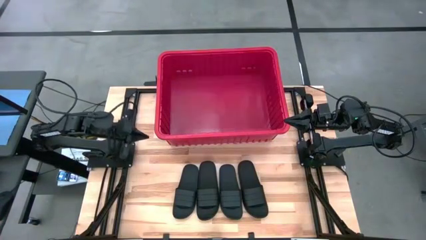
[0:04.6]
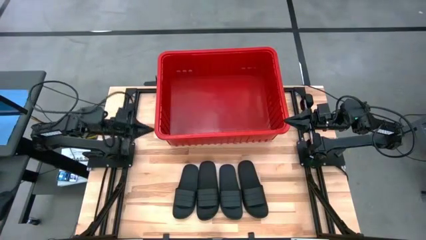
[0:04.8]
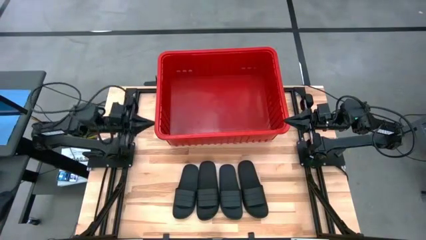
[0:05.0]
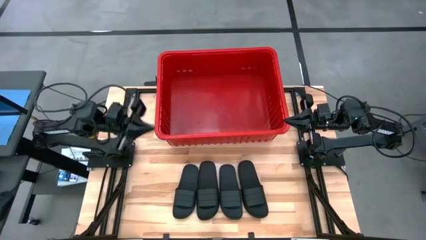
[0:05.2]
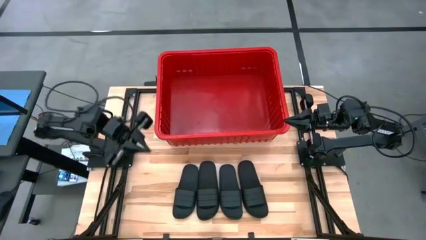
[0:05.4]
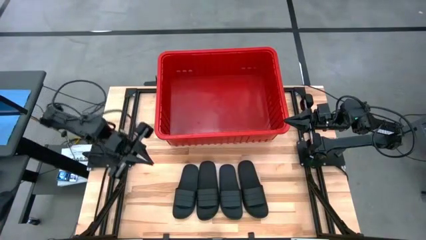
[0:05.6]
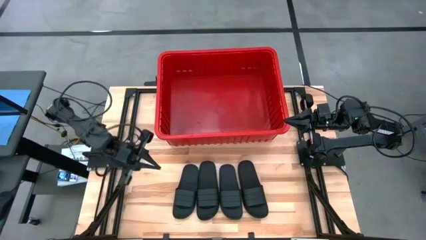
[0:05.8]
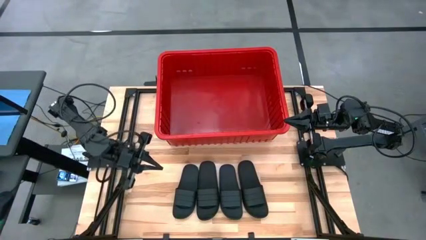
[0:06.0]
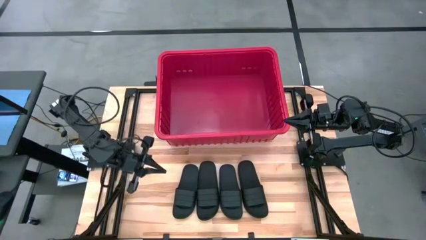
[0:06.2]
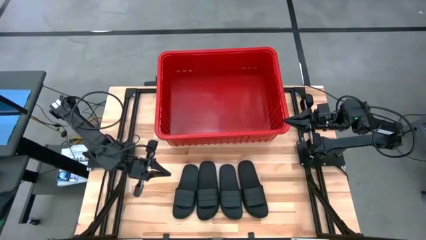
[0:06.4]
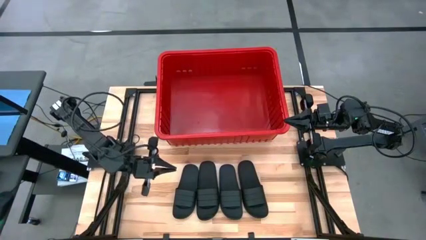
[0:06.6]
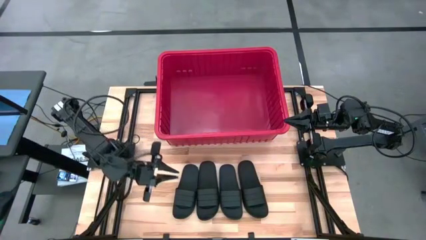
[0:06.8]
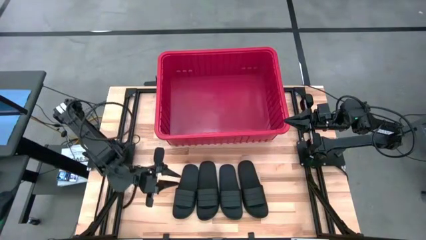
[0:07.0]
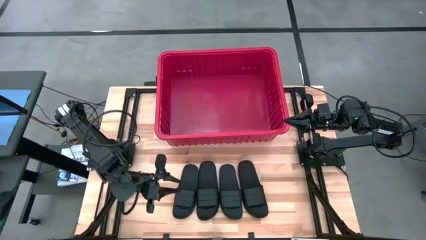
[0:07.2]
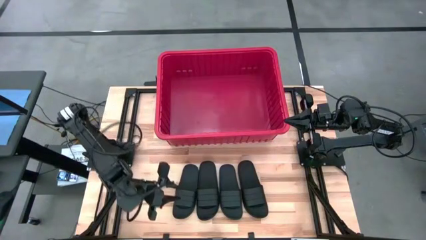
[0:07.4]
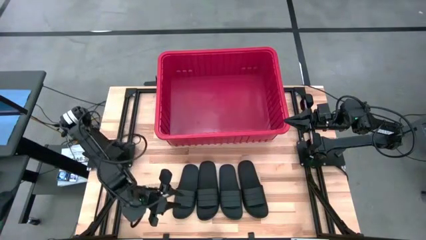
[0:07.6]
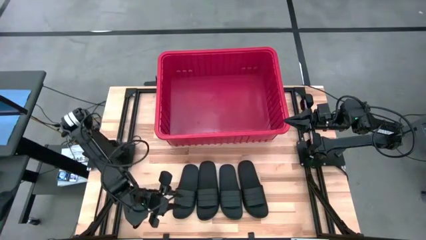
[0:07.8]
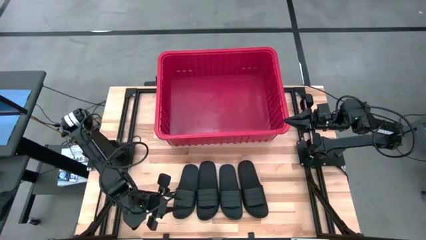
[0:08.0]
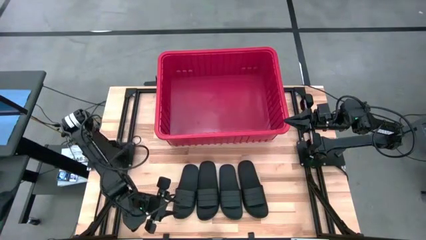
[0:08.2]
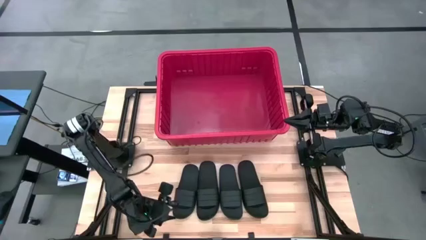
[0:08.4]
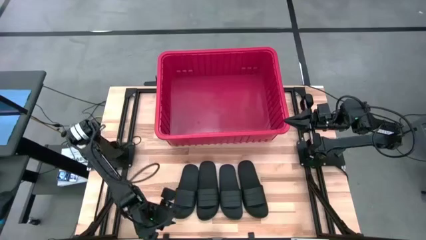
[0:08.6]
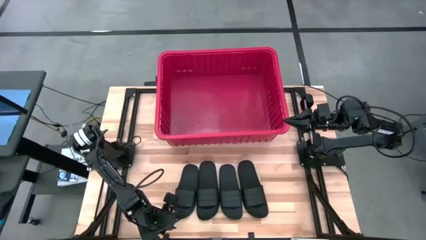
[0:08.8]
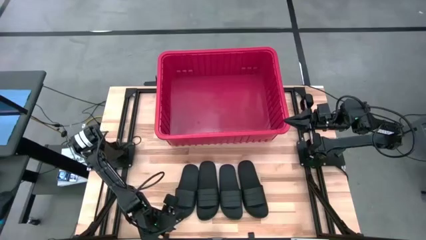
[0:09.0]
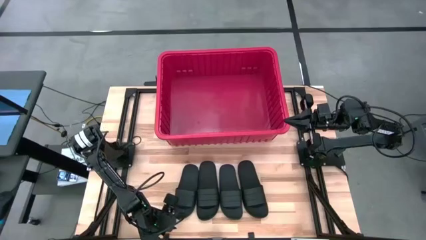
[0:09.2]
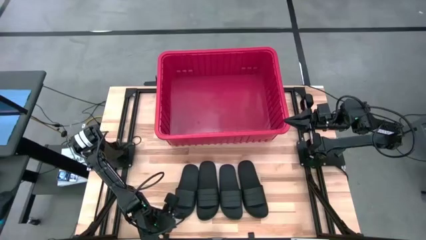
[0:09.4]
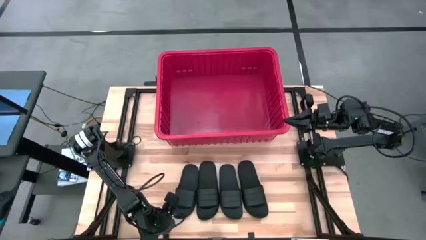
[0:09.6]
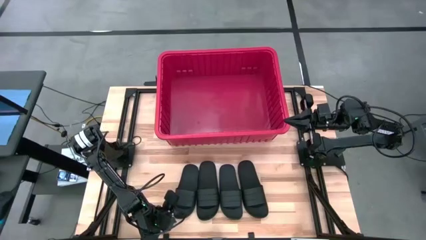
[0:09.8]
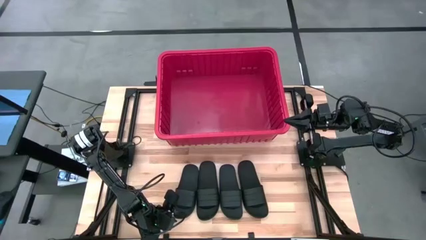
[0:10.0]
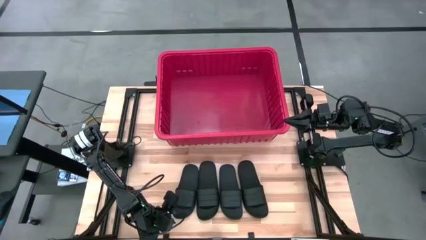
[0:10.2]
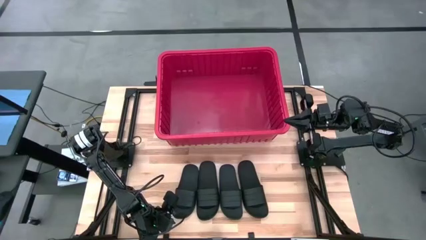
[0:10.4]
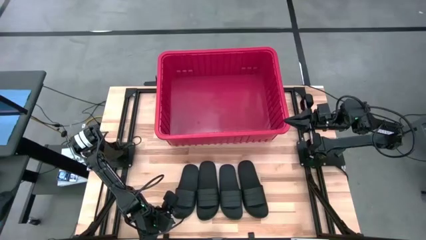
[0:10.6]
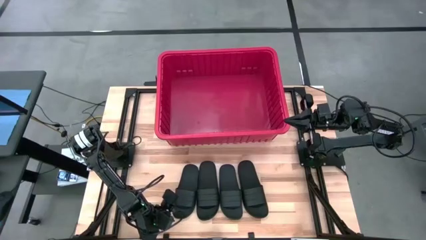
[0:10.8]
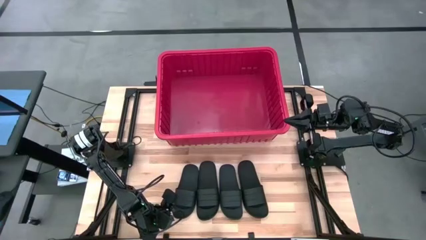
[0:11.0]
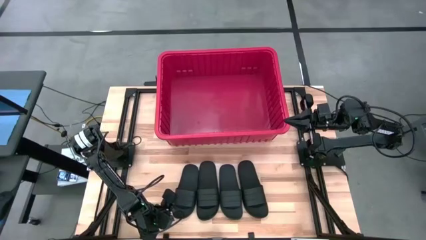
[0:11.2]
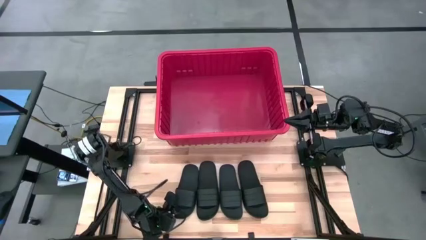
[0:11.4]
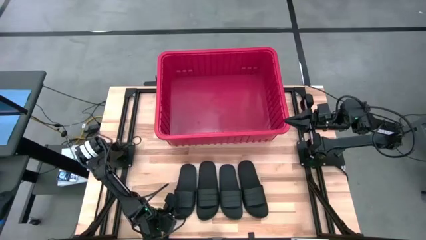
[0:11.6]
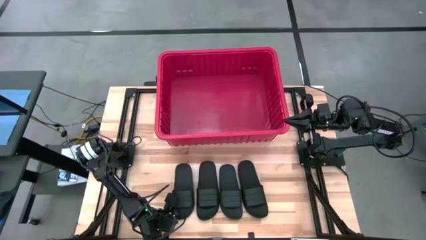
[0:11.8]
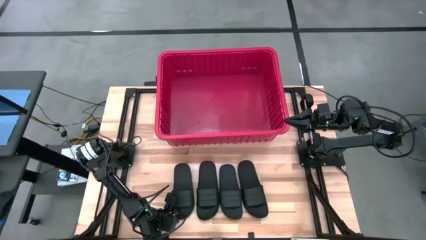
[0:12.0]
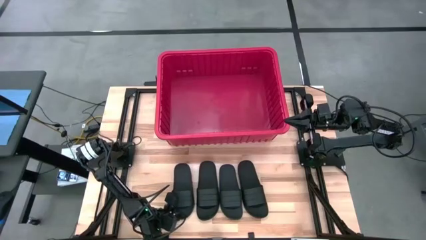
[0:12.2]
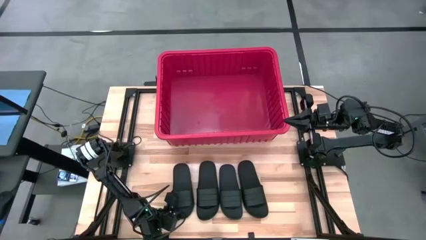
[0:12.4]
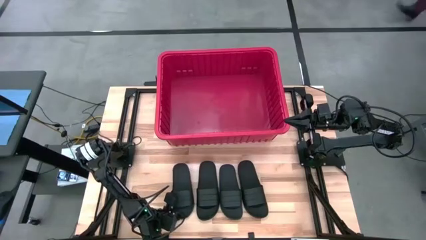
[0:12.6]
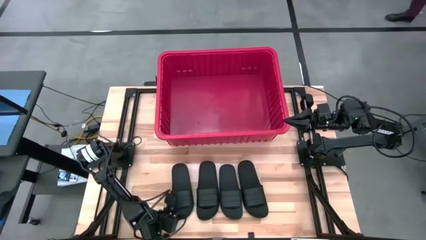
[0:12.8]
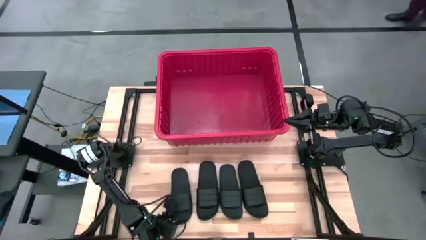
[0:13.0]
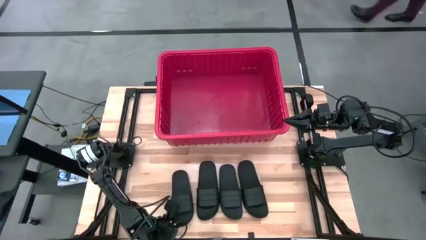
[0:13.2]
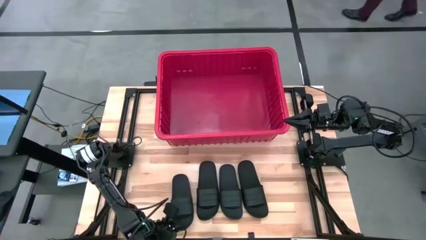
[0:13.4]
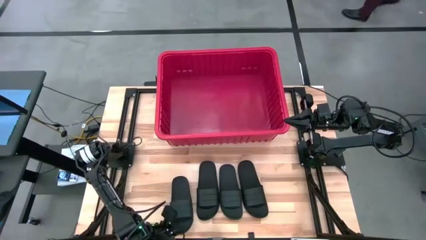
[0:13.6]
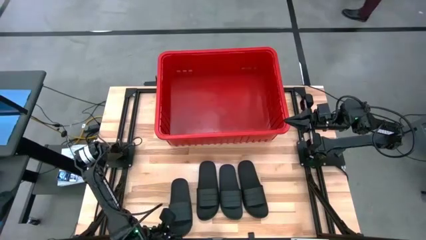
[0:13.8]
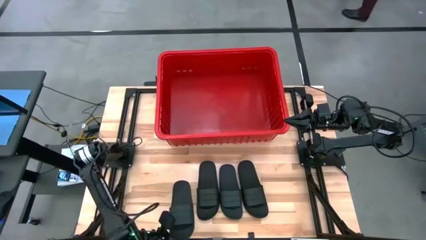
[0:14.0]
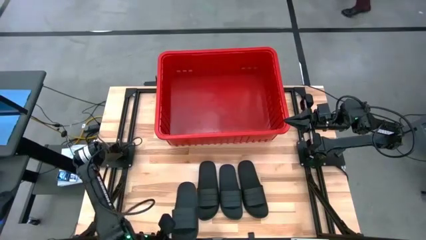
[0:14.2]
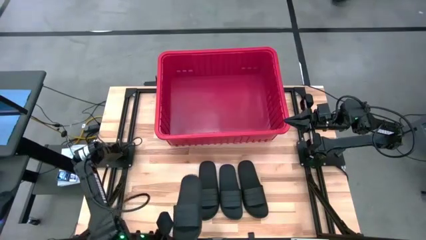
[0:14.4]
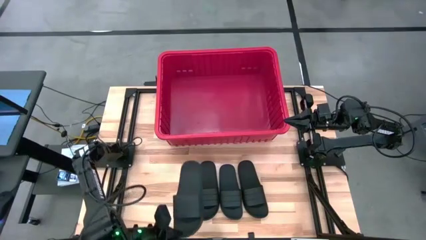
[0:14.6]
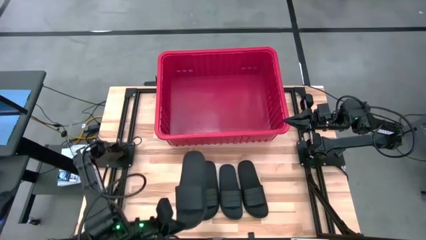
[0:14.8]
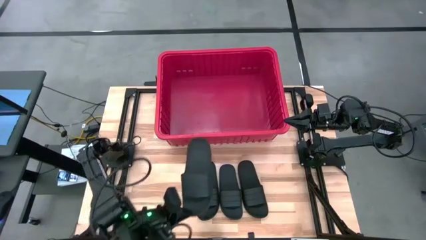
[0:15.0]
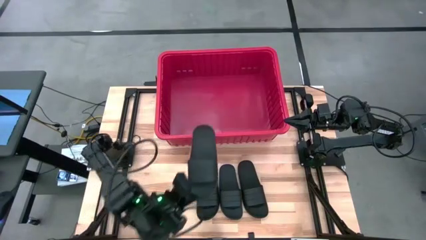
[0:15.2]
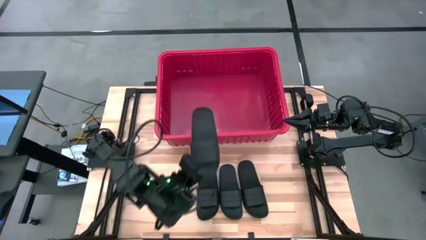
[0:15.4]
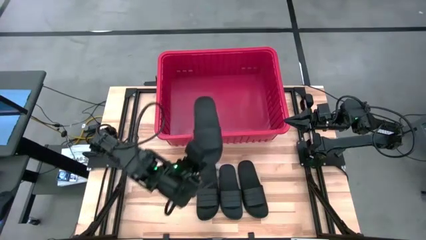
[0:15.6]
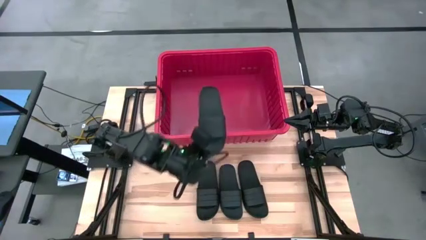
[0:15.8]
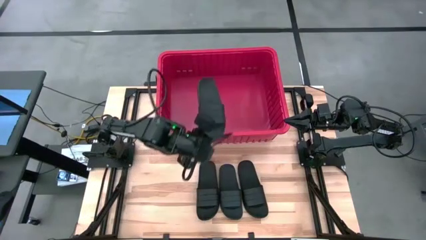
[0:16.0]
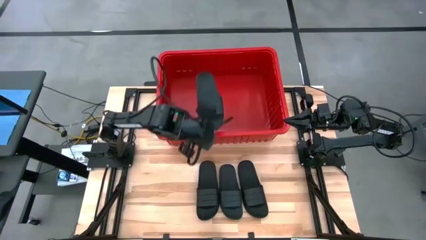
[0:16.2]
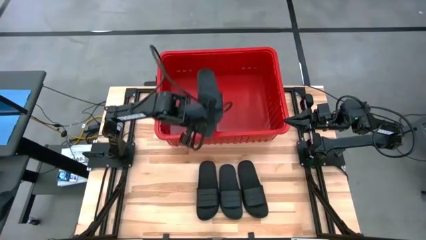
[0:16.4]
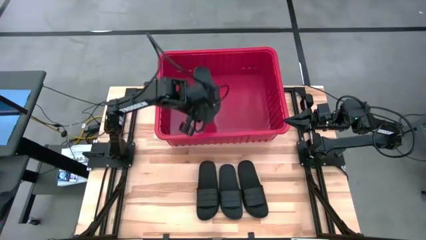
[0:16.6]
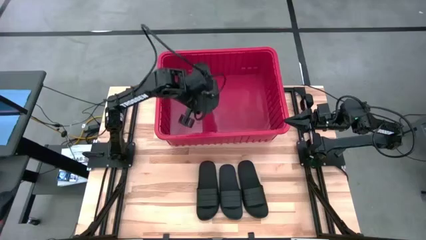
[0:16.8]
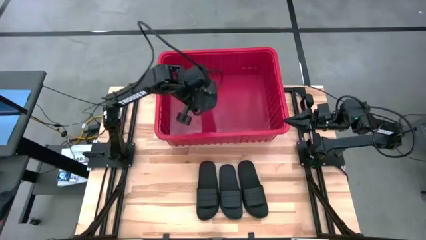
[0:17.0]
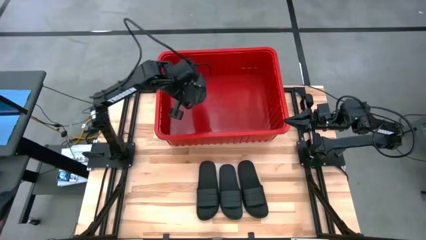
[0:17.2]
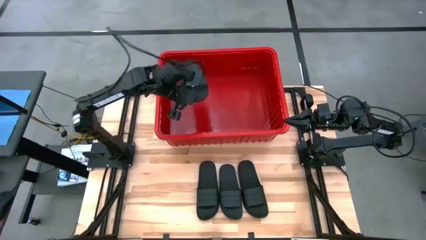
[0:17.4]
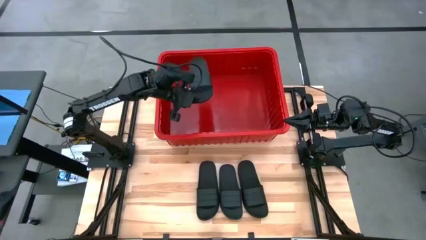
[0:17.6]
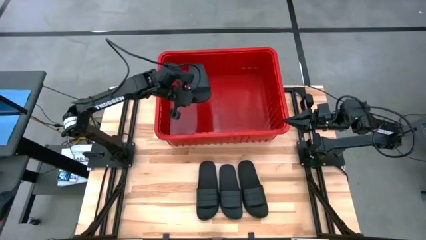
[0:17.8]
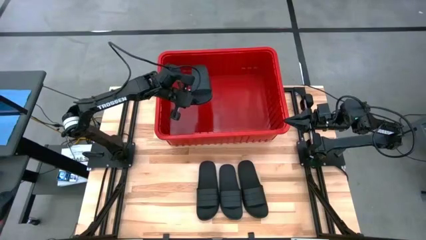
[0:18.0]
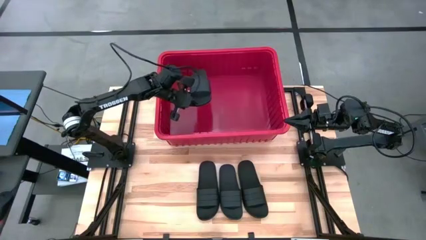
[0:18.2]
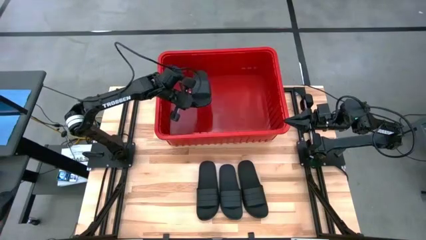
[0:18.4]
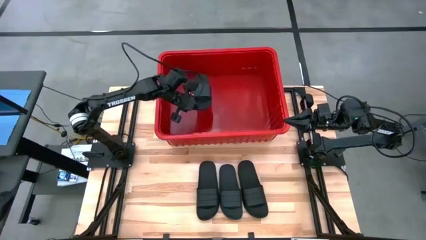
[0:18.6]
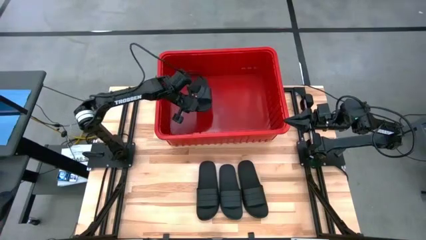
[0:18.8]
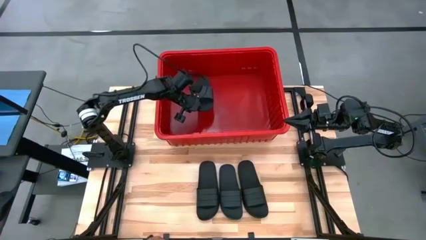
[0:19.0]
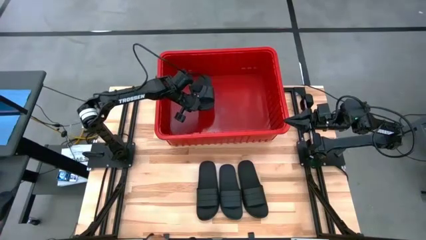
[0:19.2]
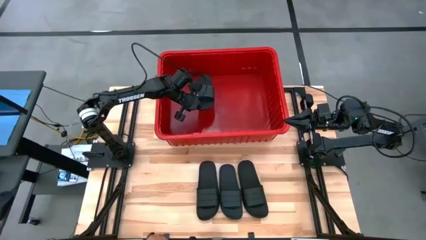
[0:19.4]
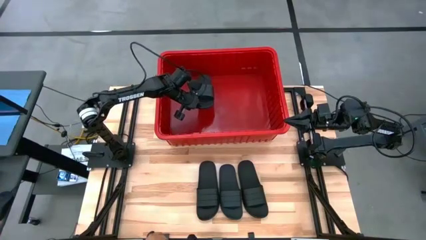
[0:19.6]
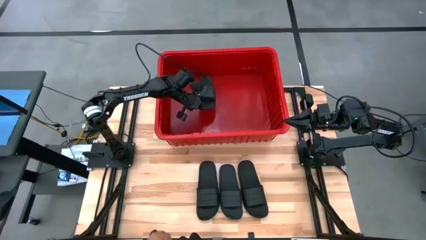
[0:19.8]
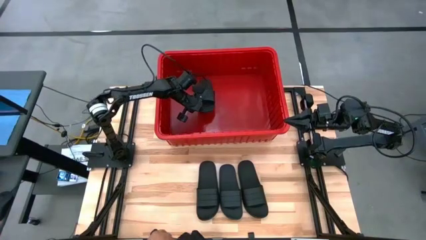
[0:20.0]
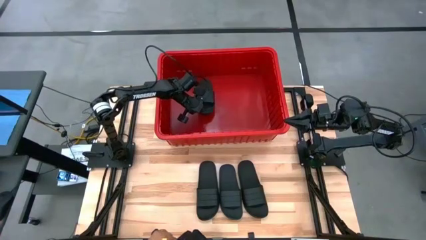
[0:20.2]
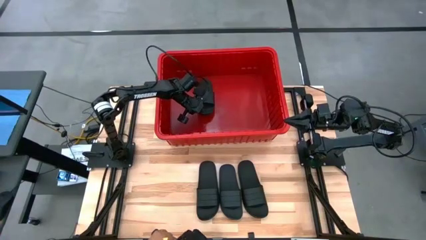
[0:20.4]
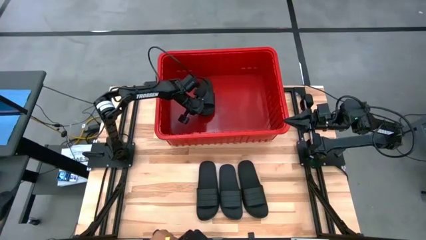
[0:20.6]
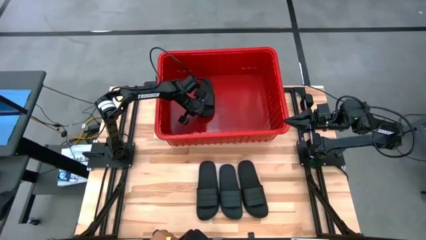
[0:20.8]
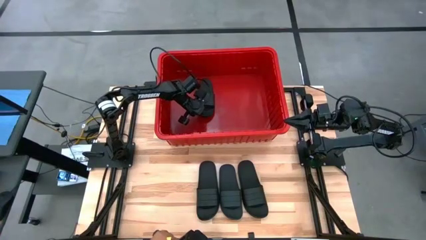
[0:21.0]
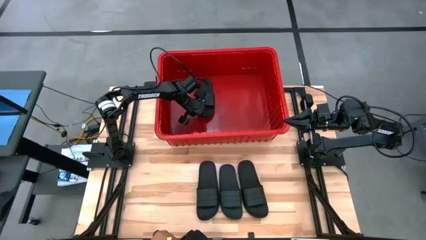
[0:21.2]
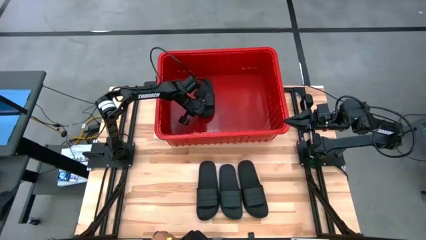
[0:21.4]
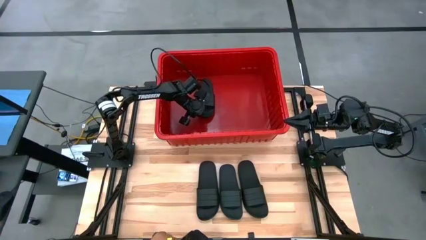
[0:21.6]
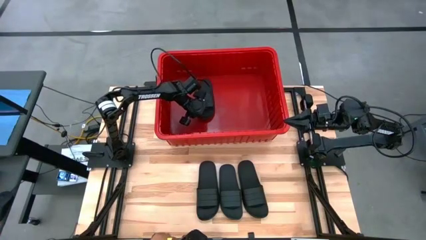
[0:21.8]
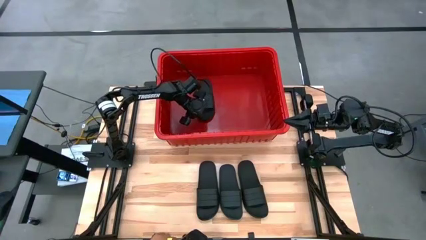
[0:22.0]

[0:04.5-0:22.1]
Task: Pick and place slides into bin
Put the middle left slide into the red bin
